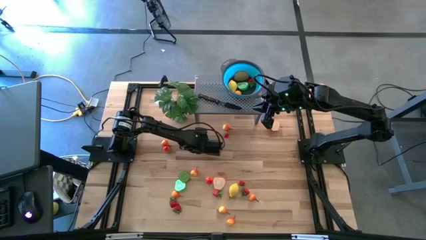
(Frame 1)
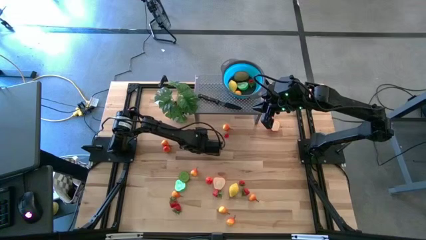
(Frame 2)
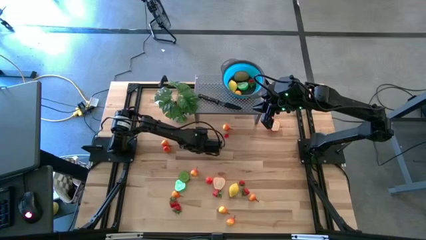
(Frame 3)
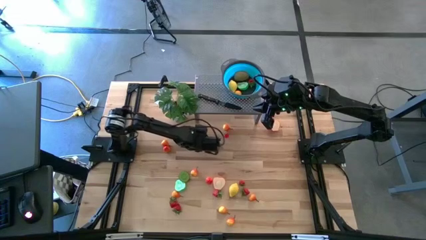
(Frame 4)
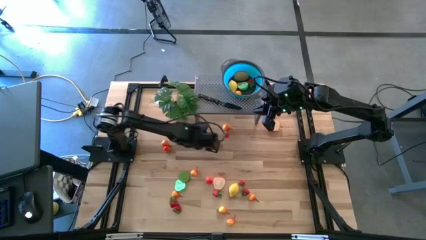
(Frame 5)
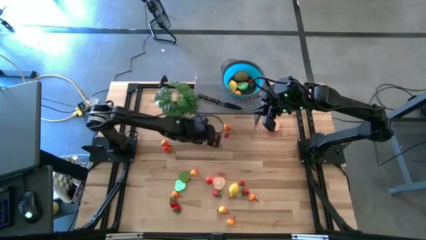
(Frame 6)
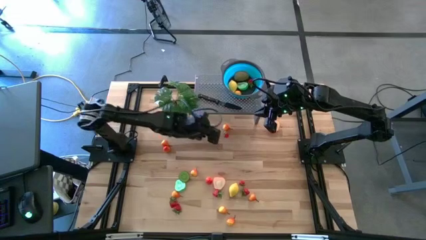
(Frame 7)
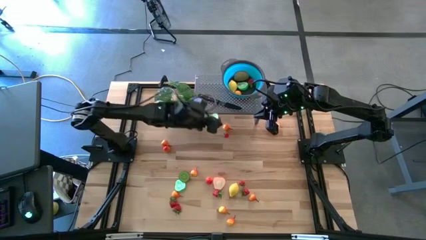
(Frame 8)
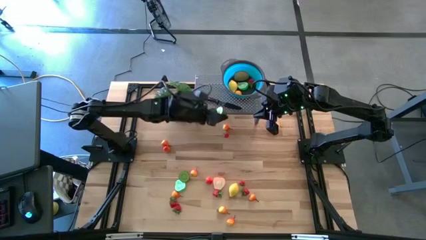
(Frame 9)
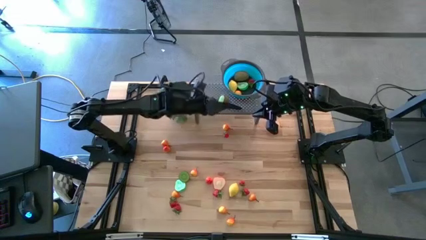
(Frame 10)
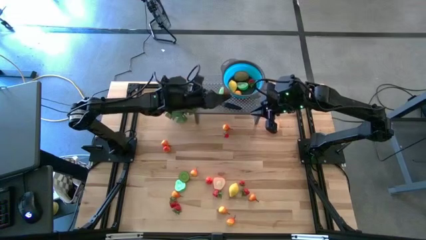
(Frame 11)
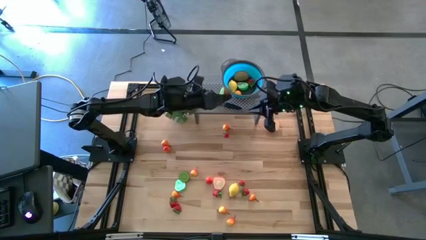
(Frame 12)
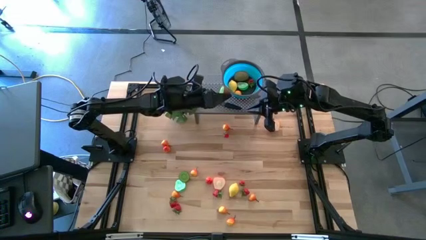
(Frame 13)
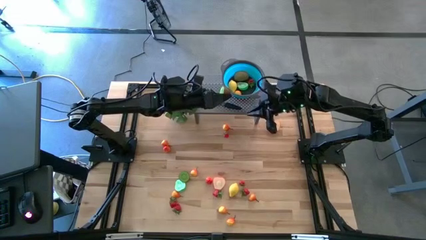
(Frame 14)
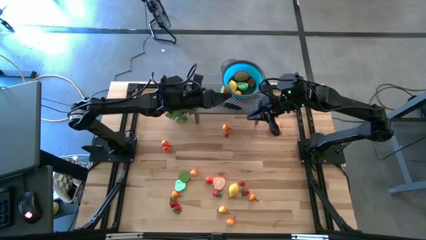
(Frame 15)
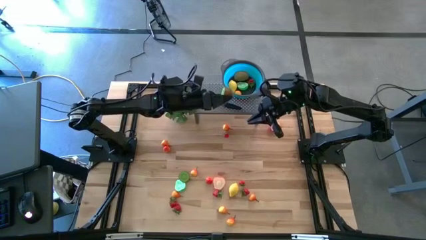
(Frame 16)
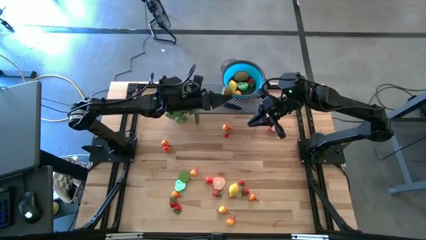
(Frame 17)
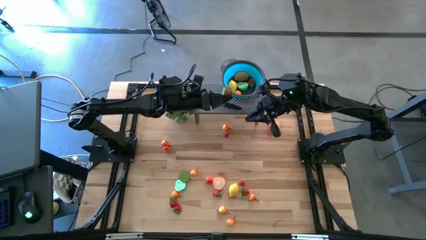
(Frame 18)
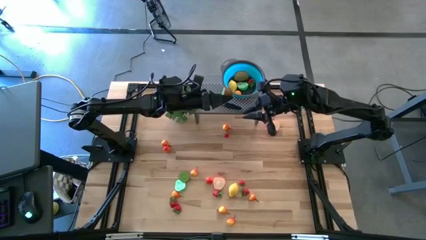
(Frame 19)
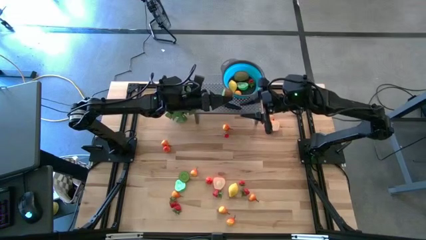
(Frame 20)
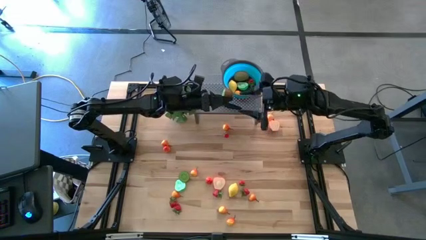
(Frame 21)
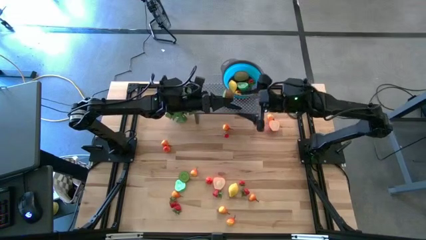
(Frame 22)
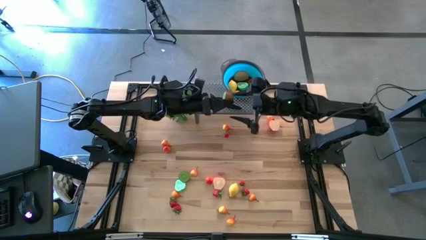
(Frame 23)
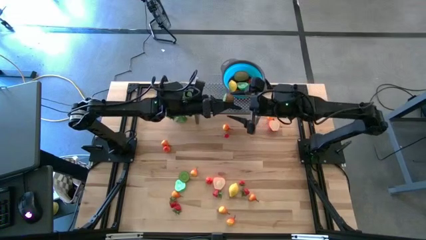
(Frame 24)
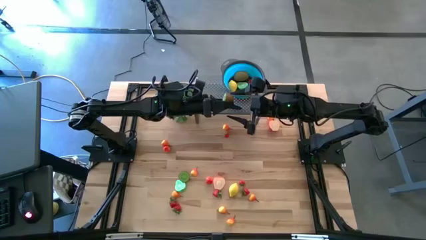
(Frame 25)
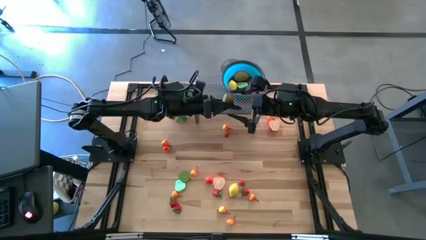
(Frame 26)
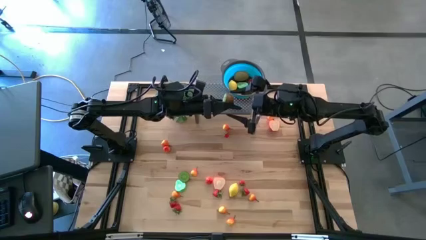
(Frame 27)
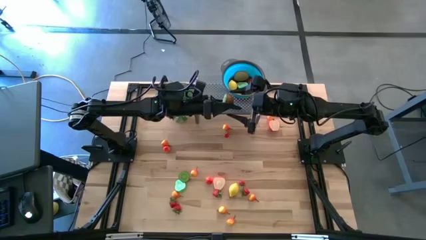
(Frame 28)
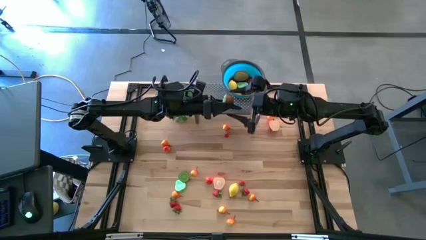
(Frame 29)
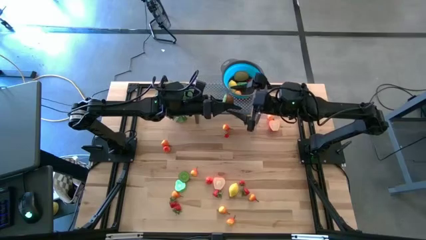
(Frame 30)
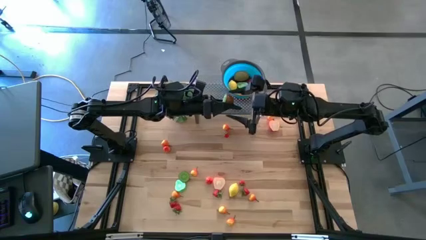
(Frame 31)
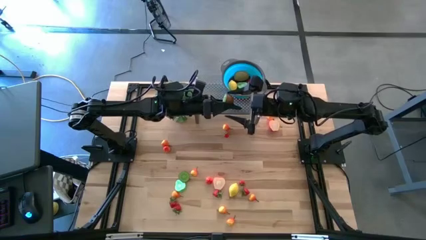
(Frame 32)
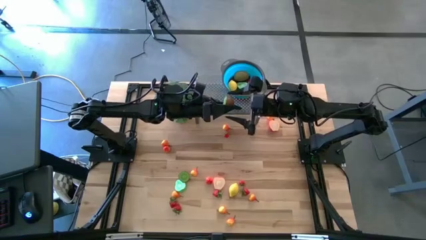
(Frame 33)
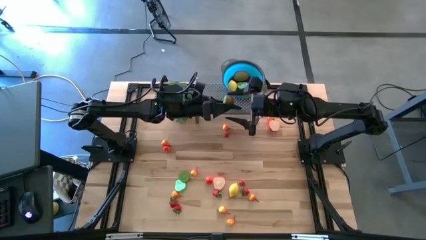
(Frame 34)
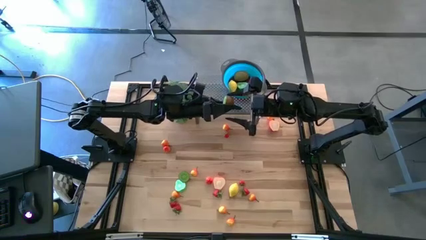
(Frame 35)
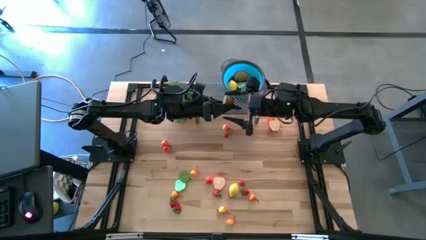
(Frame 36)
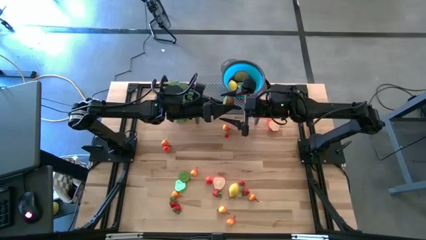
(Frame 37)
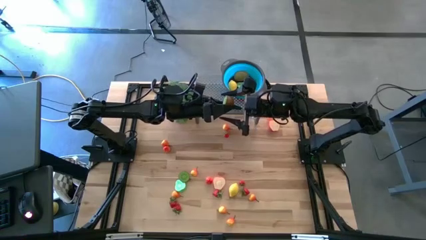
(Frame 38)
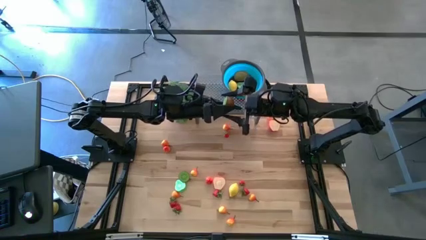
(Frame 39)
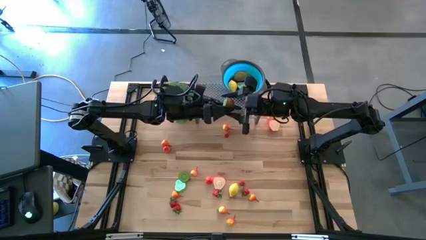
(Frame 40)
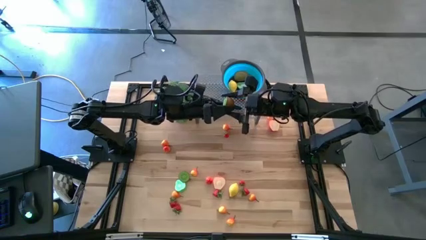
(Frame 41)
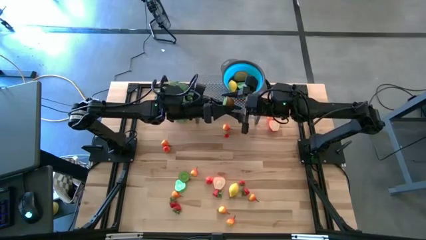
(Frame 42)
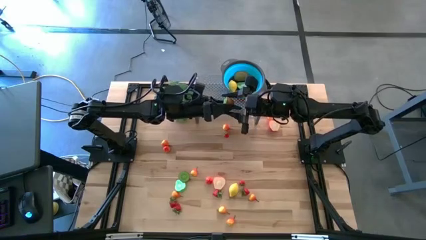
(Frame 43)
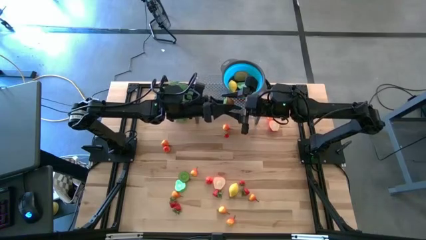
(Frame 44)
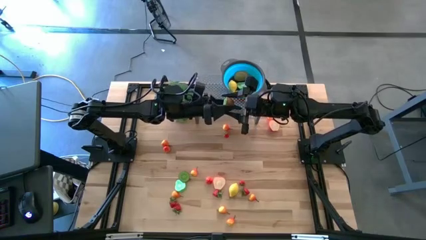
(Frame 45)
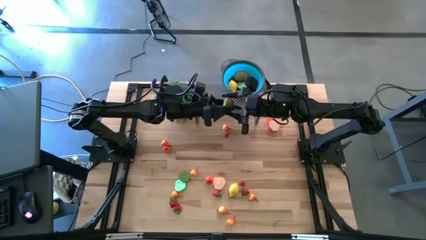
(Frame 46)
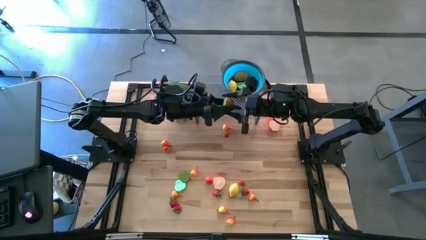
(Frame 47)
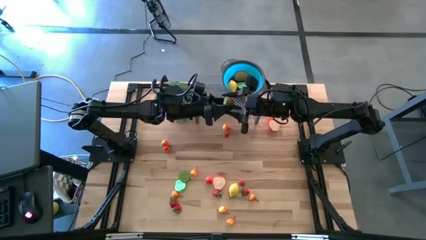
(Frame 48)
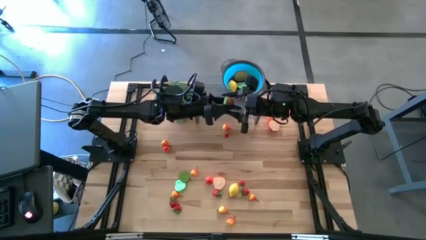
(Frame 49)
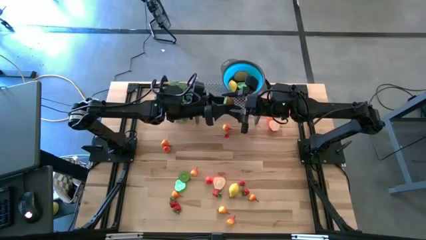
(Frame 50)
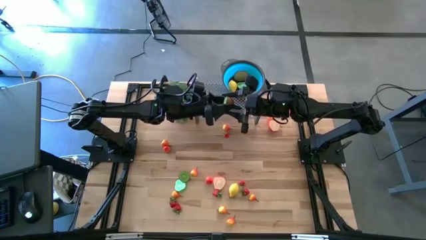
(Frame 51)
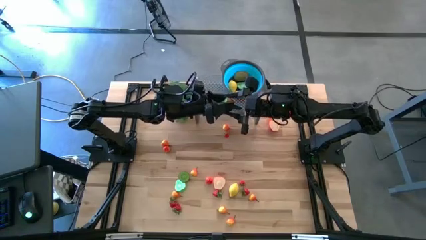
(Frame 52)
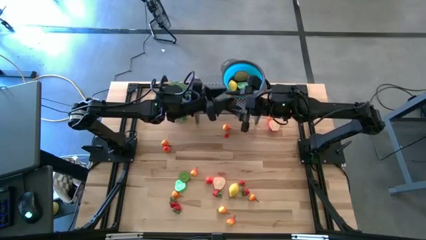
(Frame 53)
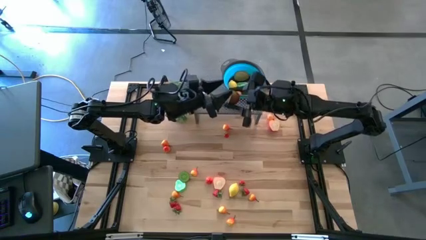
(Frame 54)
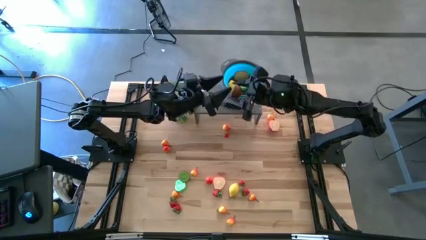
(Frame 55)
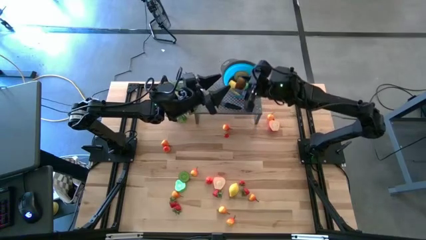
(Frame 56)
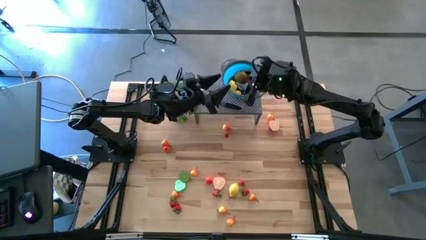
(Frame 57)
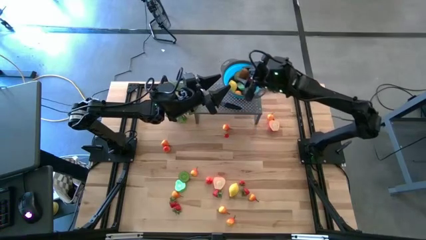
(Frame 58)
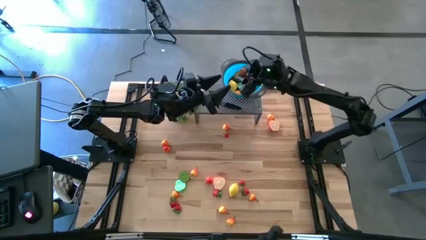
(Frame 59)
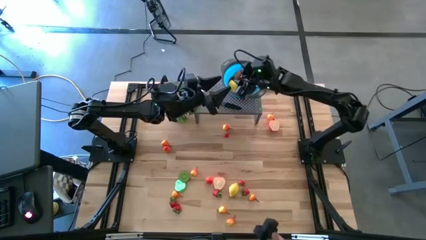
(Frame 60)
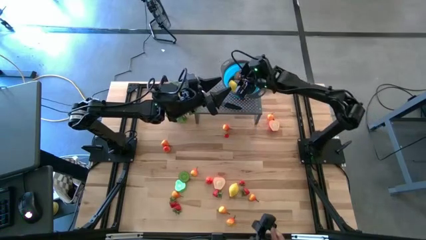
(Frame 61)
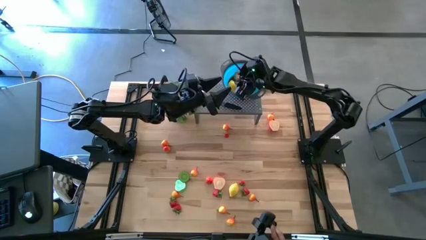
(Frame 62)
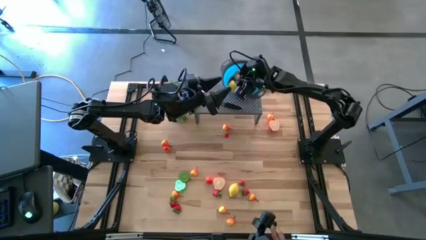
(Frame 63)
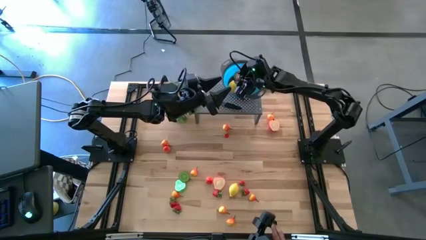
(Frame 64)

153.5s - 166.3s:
Task: Pick & Place Fruit
Put the brown kiwi in the blue bowl on the shelf

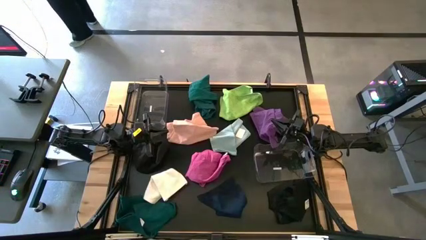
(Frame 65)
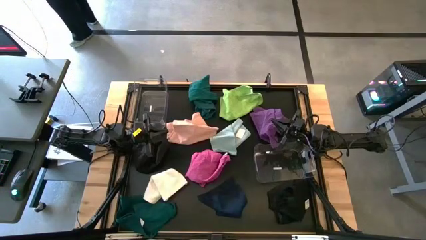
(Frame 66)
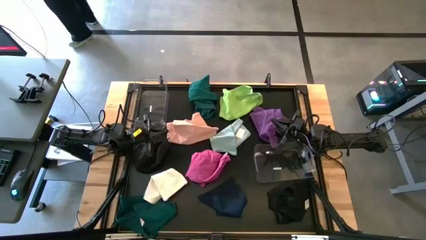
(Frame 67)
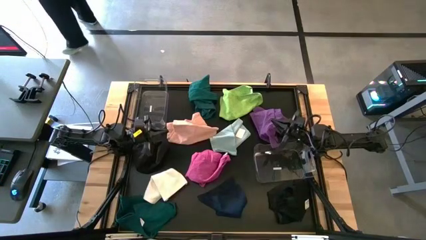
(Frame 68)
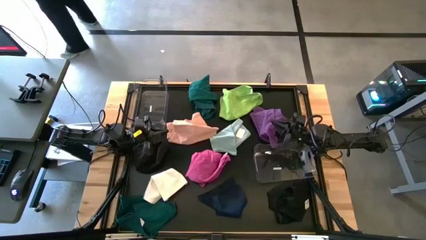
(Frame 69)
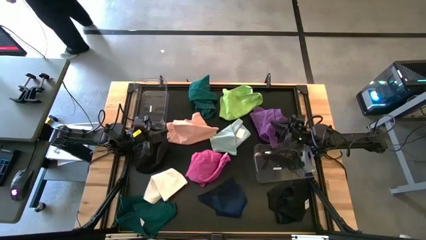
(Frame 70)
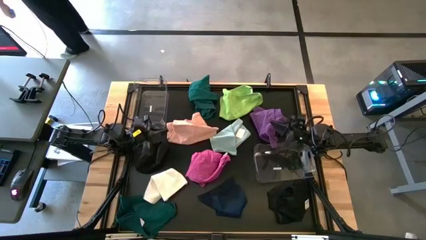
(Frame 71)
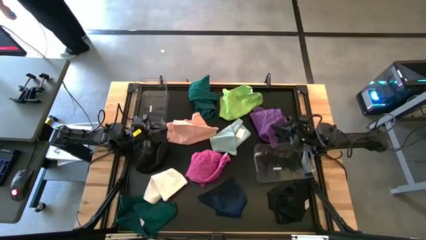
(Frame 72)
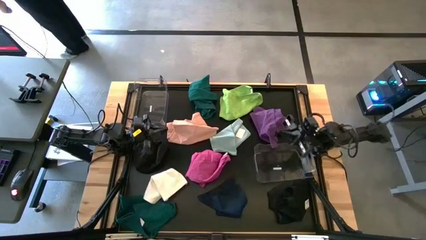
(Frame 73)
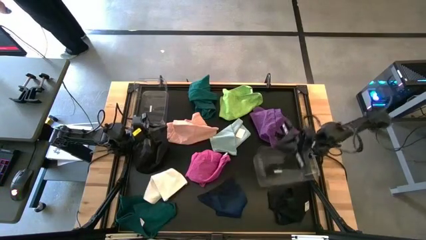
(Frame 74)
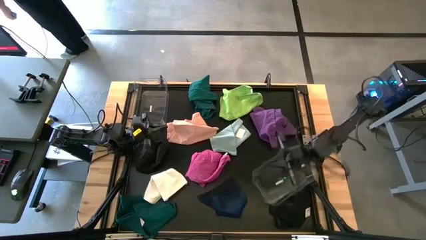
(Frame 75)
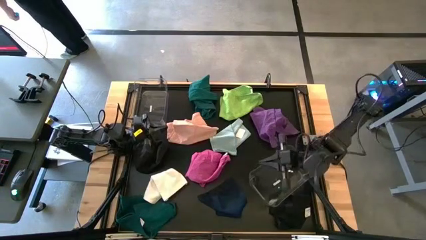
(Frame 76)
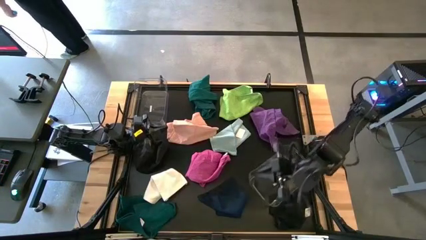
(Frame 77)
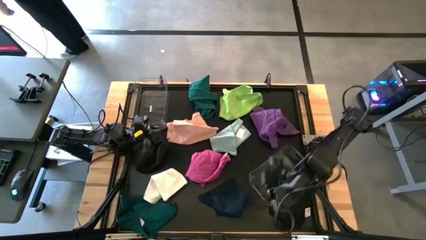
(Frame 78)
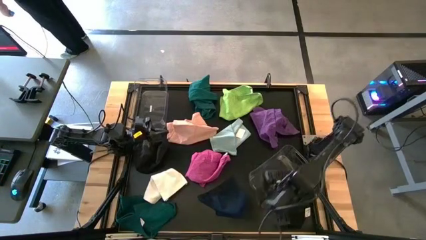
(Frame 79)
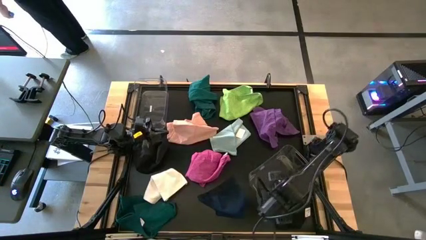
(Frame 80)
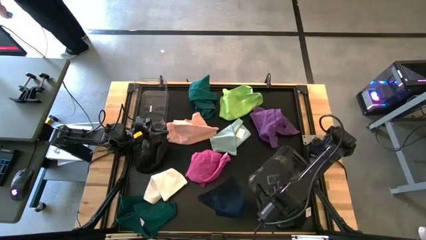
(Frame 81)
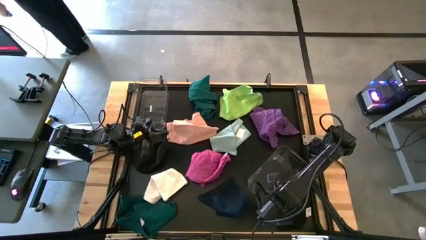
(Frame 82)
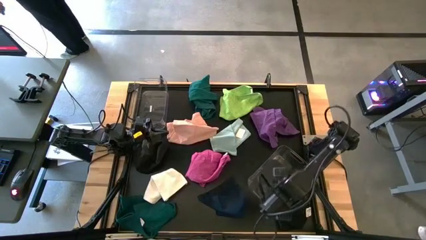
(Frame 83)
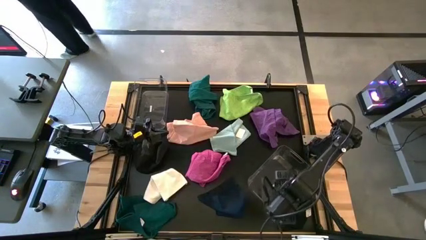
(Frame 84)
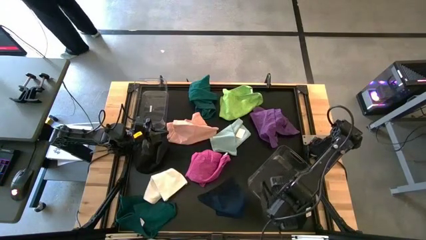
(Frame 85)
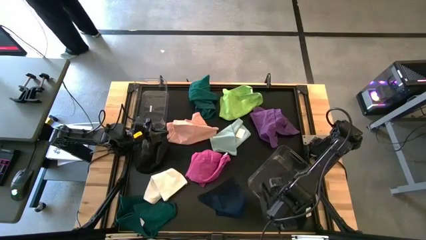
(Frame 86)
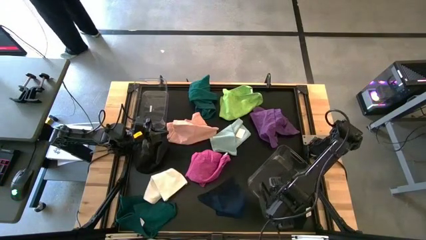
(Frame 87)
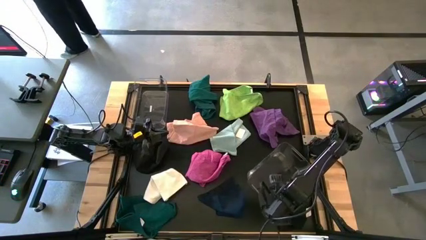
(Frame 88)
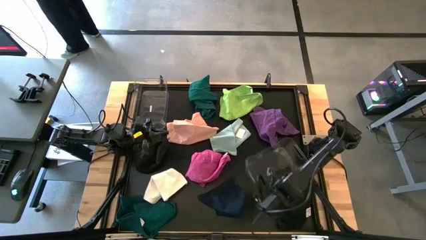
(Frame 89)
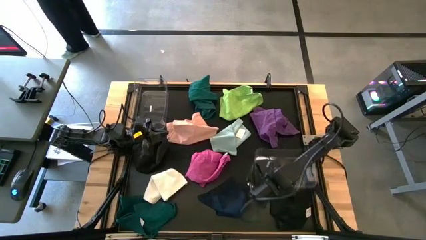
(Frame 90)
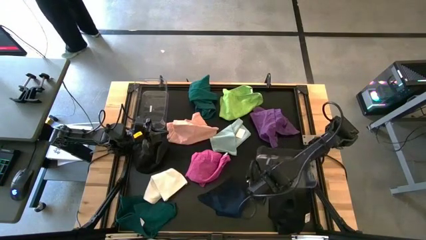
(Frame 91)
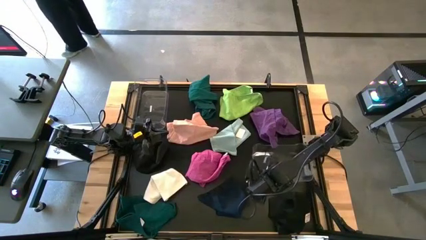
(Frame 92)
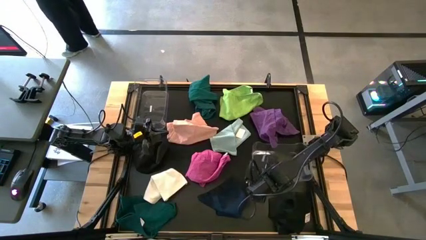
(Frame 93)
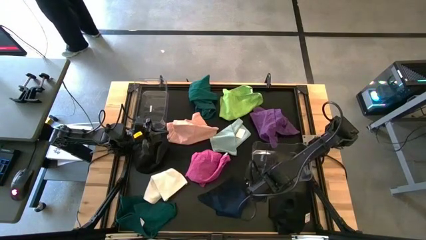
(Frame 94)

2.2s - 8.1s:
Task: Sort towels by color in basket
Adjust the right transparent bin
